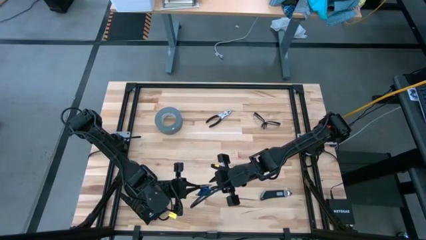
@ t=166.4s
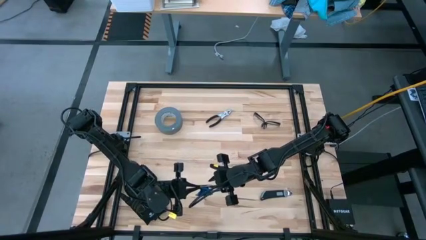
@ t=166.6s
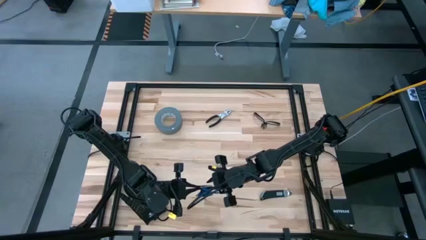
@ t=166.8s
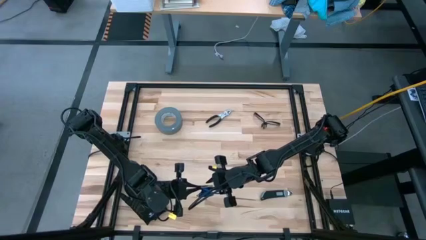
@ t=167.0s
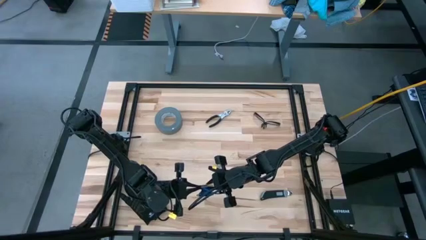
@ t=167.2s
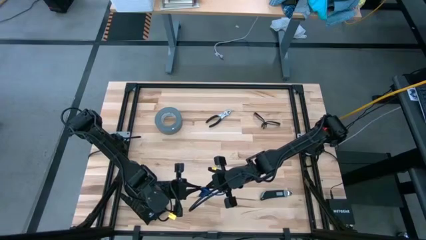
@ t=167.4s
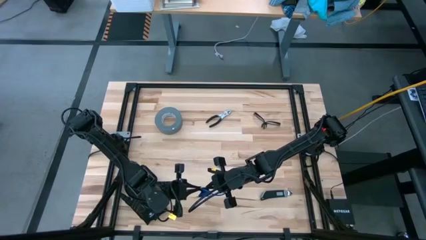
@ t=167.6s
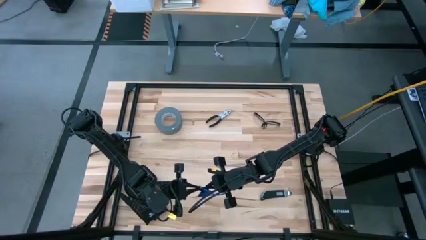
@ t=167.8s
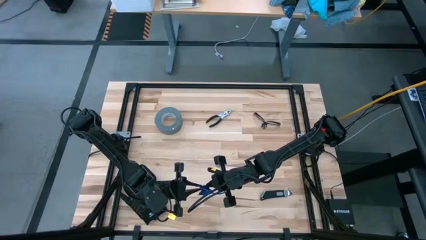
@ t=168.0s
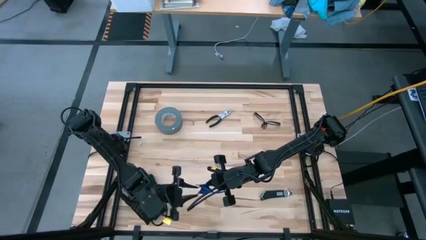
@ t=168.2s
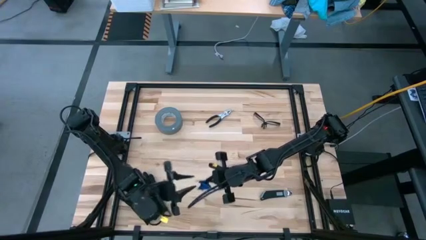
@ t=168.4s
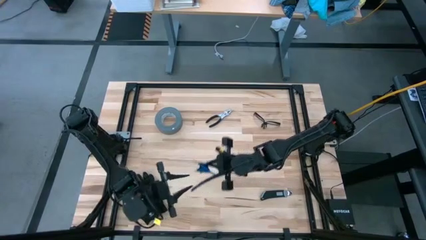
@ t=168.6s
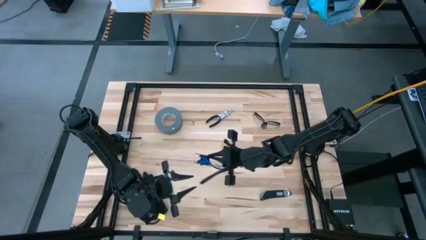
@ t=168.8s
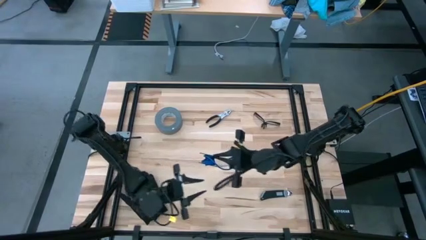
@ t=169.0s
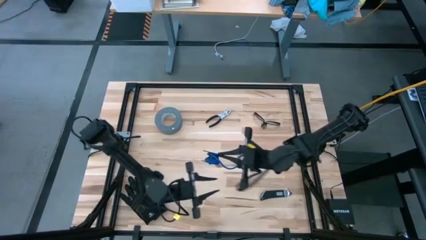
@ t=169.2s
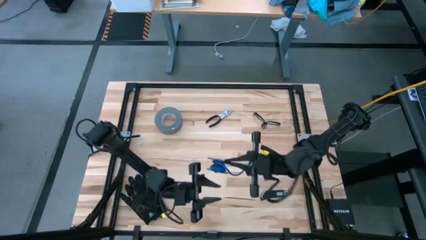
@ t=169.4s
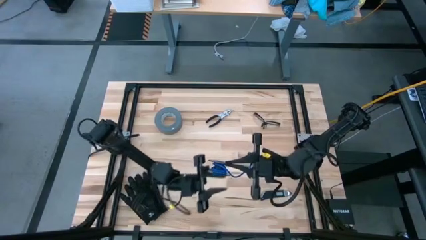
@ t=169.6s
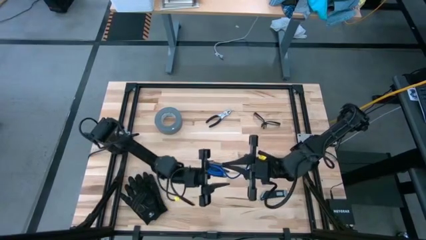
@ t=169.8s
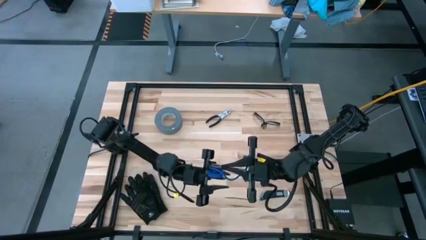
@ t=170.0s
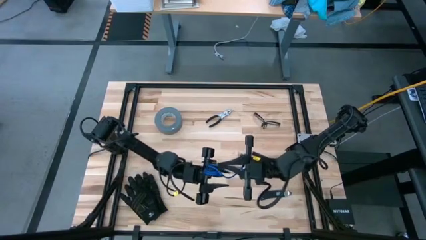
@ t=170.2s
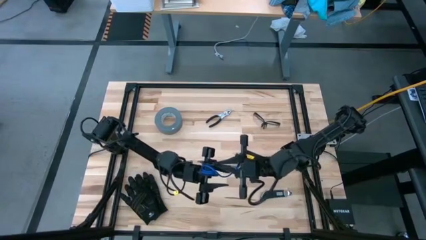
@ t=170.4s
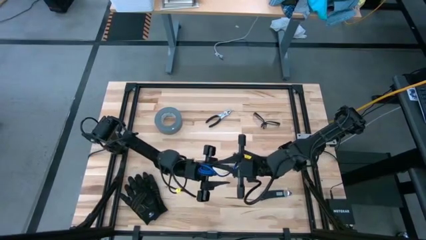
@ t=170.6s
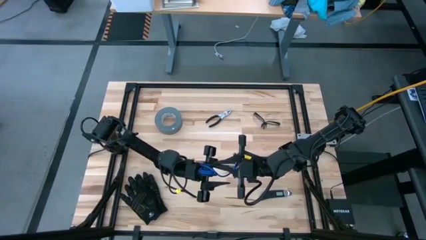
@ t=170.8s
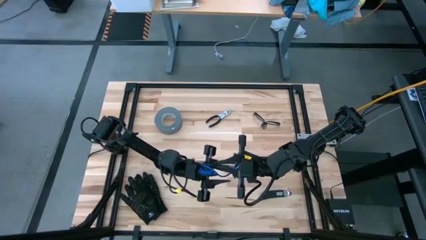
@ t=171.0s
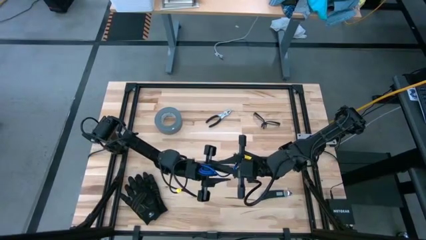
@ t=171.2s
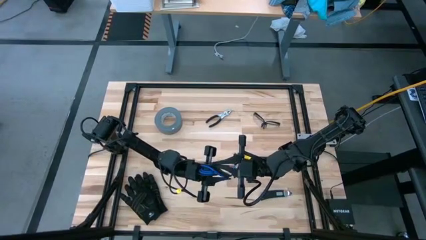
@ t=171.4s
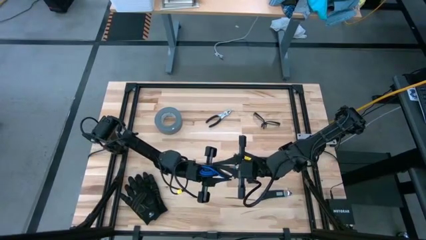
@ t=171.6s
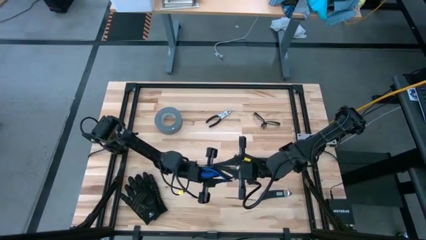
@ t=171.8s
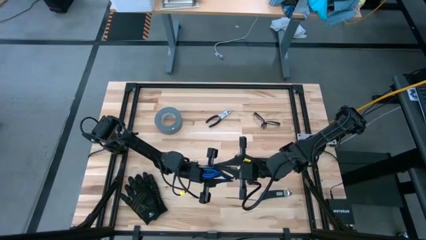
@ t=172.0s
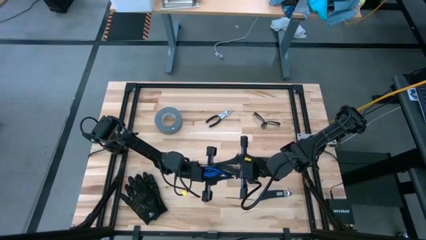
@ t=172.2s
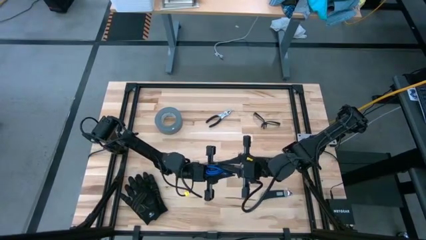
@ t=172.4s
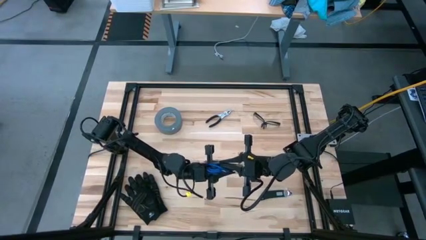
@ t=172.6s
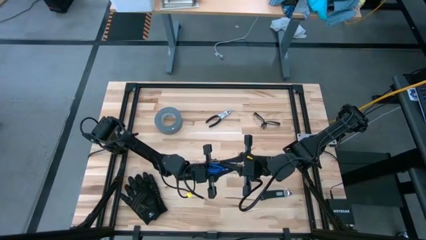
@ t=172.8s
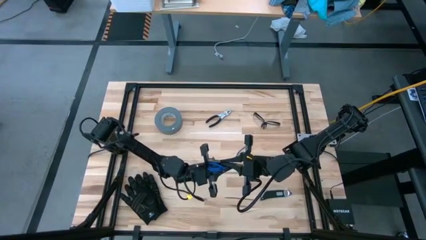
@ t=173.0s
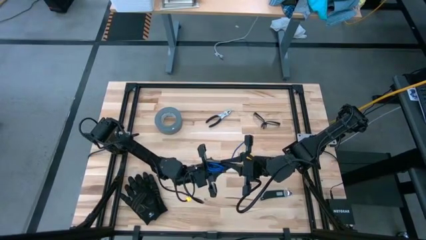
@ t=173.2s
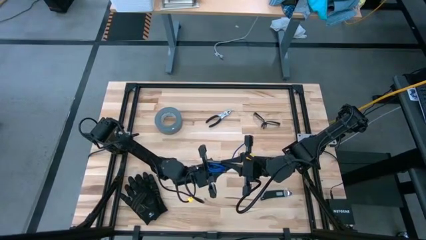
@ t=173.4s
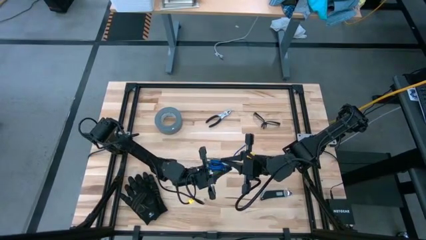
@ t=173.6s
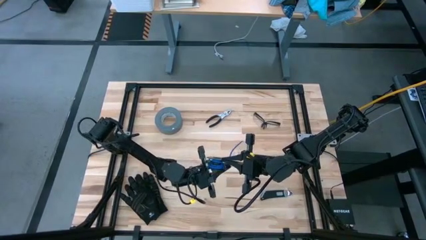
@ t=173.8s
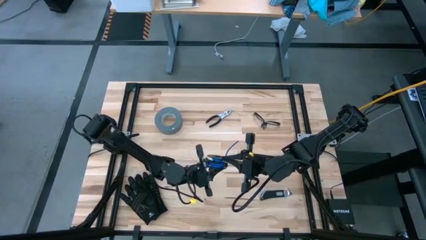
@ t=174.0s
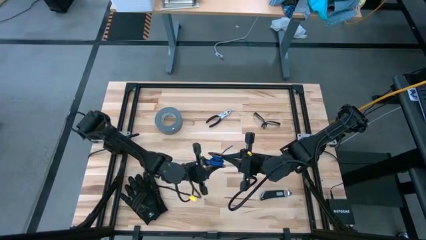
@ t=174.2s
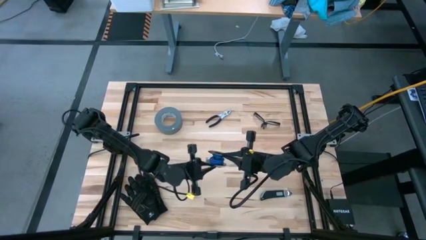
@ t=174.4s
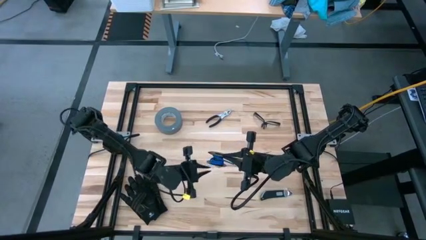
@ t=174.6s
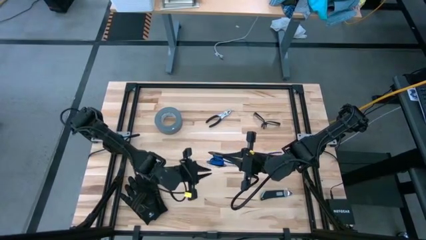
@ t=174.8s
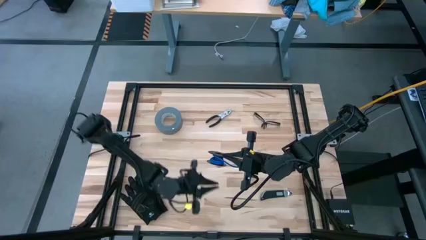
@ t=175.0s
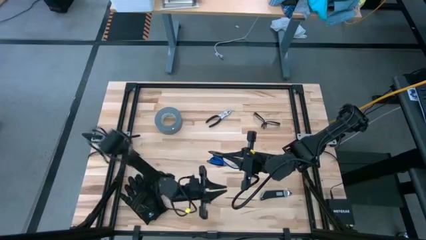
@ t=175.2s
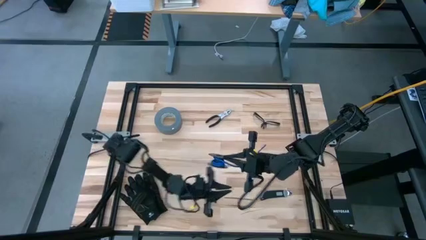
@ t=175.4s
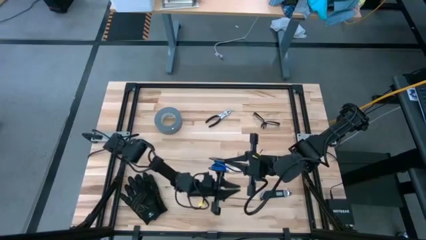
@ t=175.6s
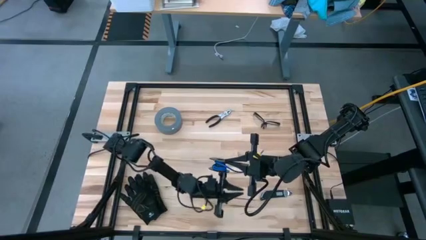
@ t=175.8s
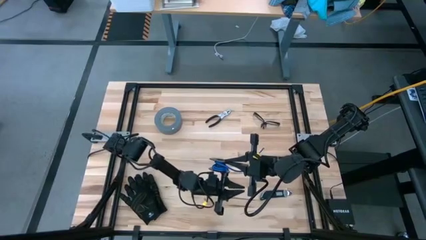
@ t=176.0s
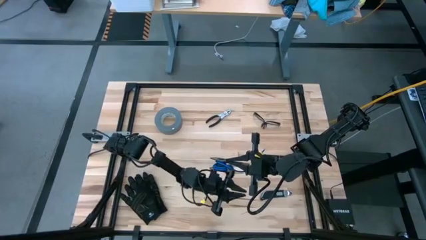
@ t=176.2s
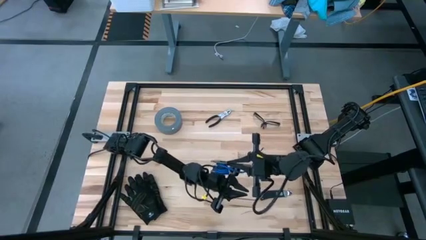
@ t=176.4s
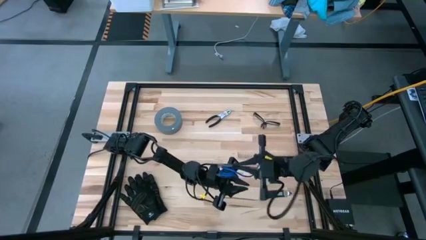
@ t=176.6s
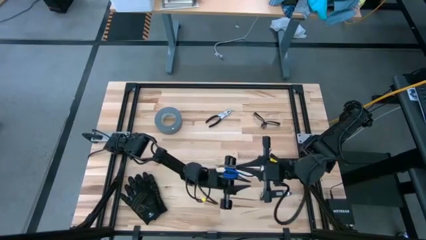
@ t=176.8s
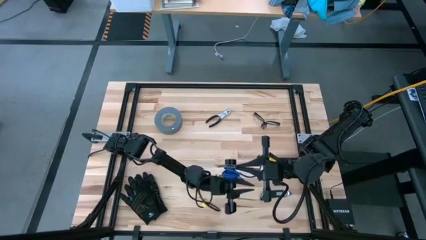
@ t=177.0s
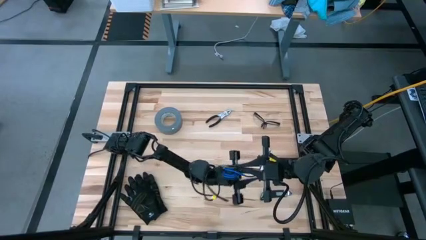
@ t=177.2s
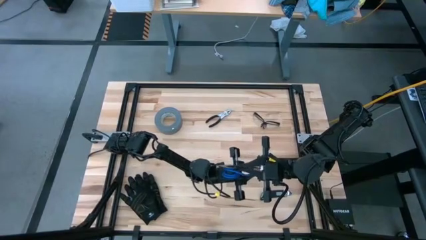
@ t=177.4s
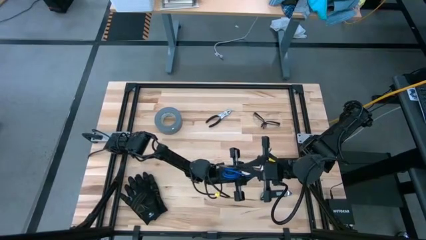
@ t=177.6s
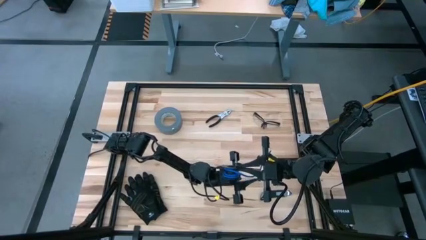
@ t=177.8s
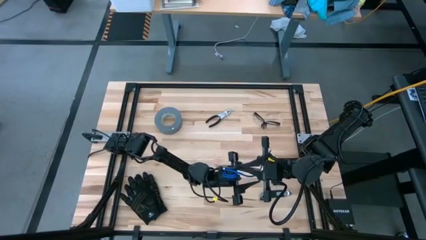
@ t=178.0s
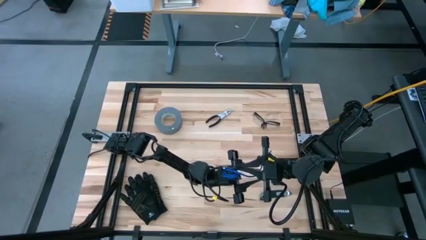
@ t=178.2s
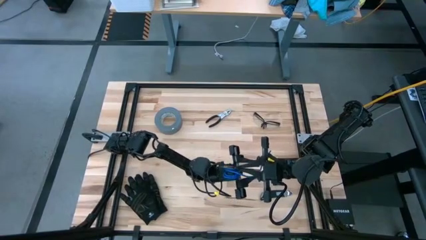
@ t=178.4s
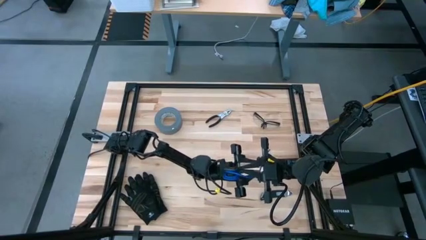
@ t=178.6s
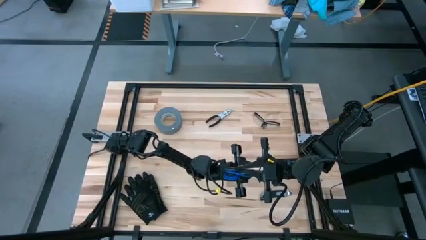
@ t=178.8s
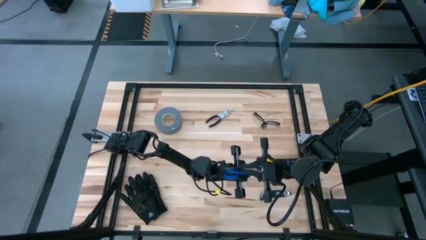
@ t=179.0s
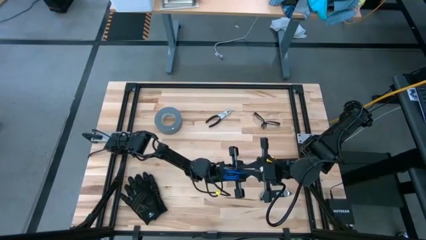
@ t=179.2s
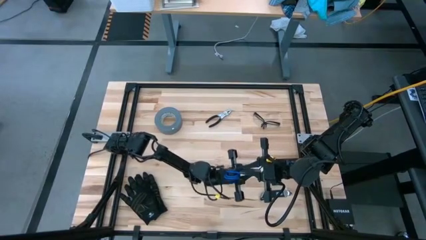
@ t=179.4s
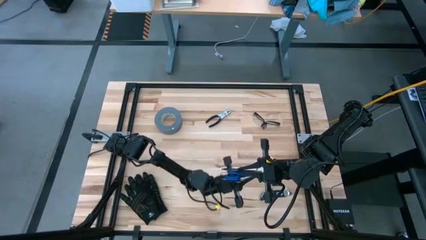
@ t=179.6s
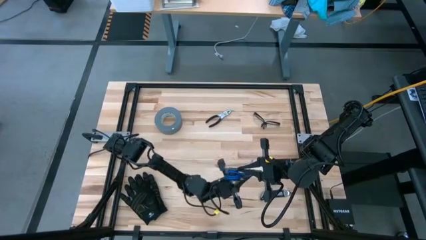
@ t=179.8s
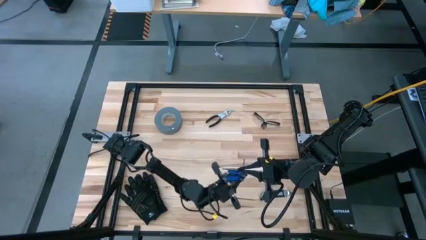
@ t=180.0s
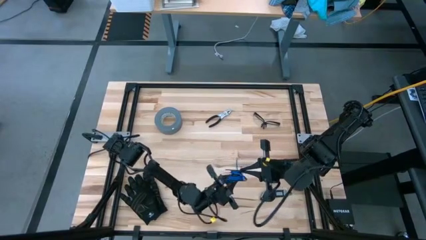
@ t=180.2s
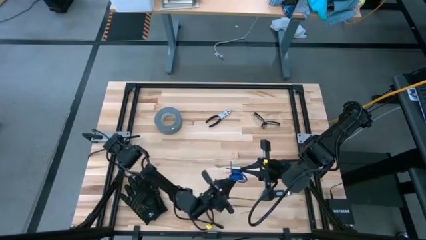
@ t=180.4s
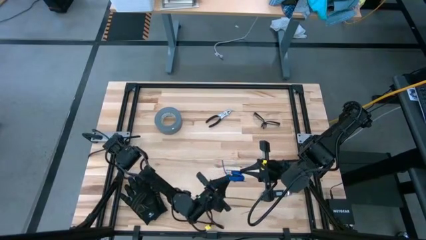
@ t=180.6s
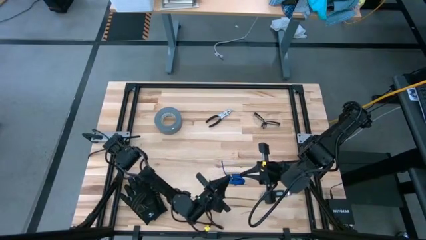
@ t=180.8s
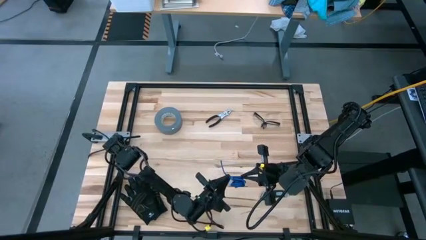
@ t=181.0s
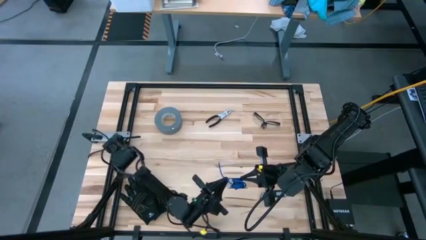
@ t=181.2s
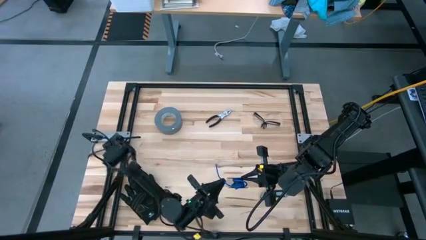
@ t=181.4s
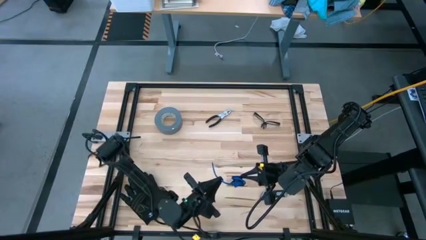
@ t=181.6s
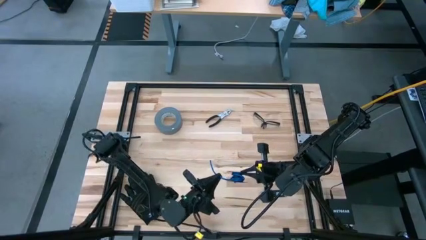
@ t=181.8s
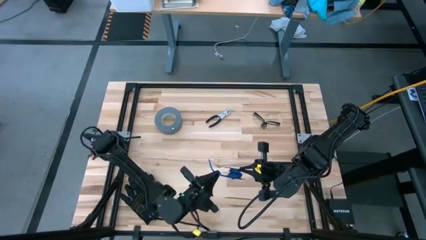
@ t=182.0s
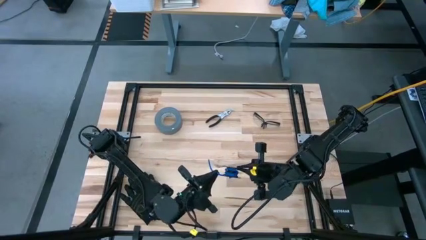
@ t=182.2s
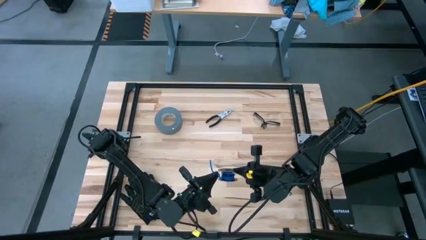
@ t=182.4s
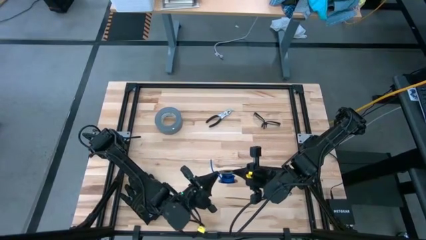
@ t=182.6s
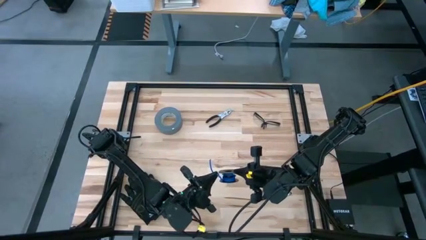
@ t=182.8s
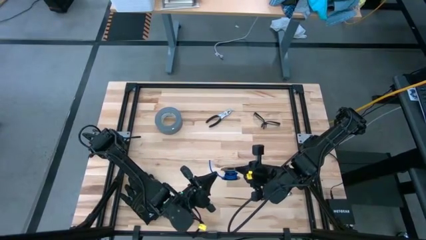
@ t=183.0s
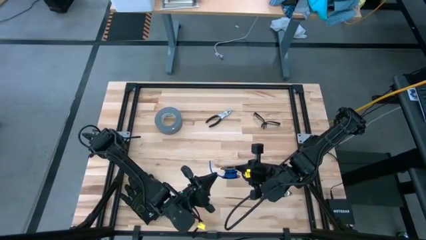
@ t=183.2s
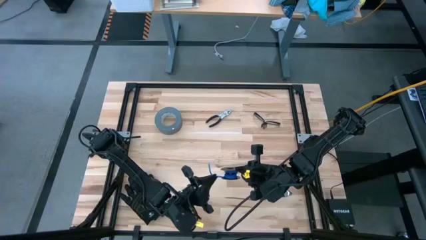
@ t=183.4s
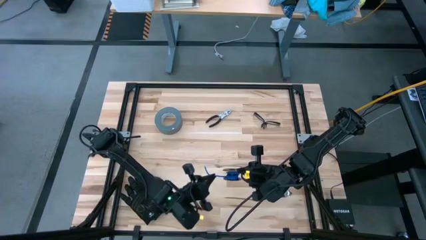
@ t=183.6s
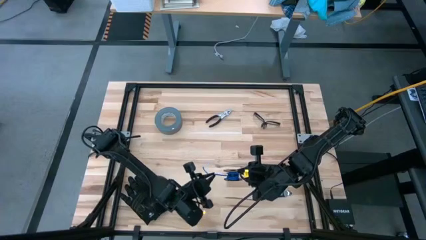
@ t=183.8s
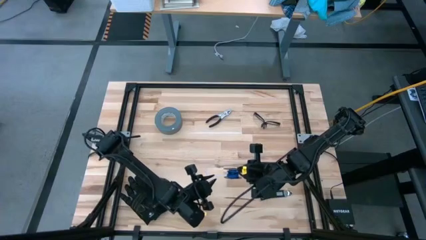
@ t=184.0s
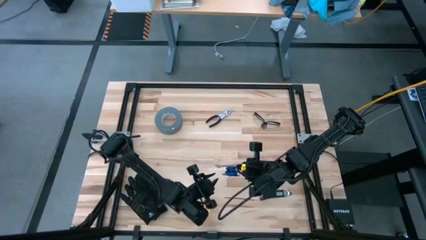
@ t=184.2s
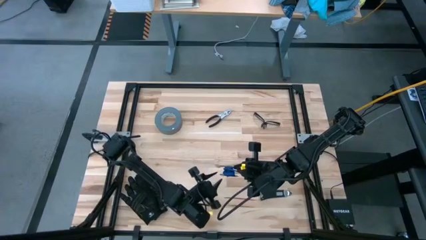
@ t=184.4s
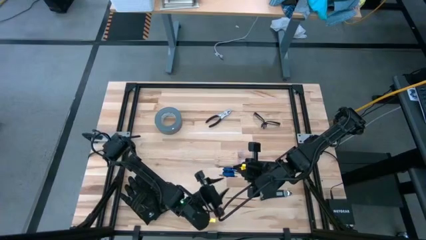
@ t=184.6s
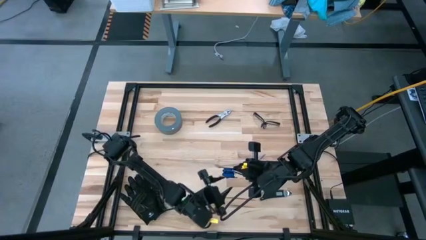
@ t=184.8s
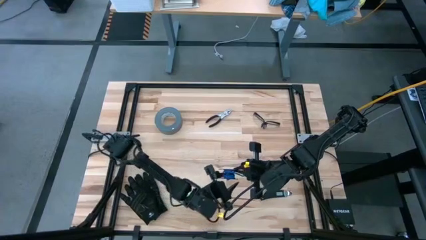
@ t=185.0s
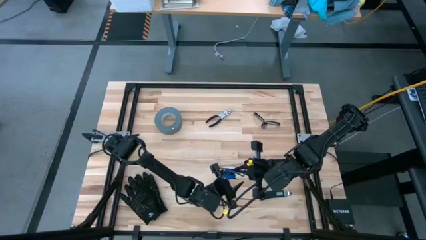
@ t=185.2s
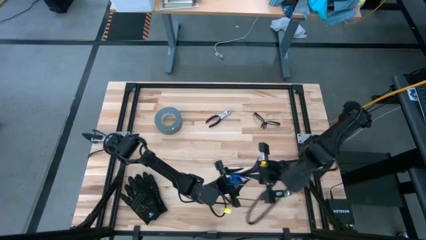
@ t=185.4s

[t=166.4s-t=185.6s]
Task: Coil cords
Coil the blue wire cable onto the black spool
